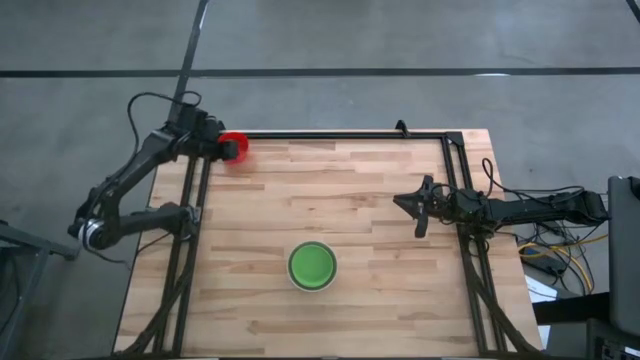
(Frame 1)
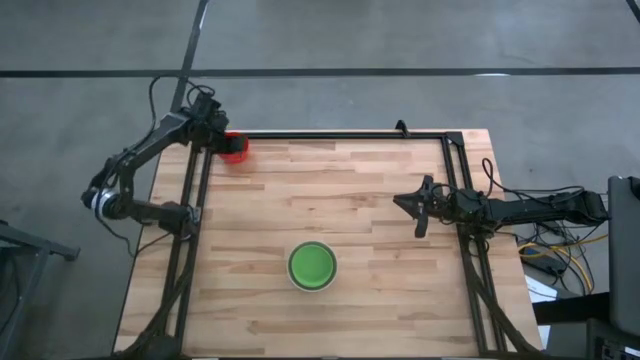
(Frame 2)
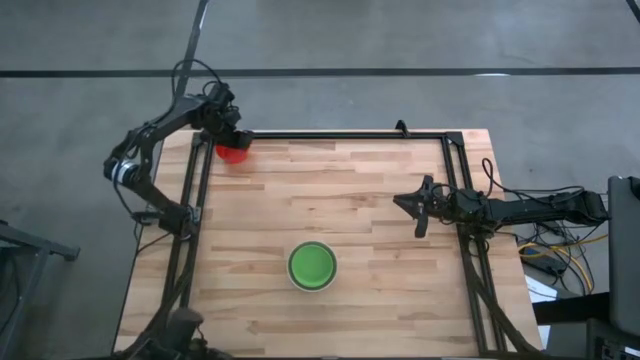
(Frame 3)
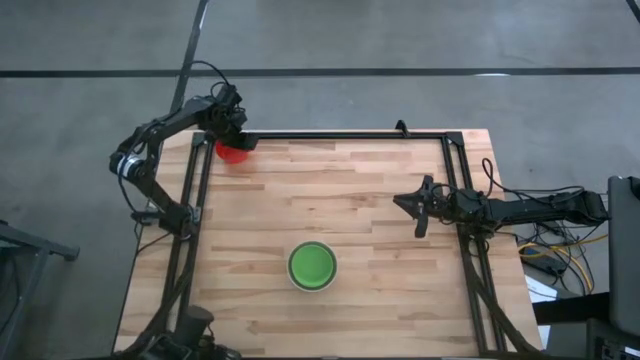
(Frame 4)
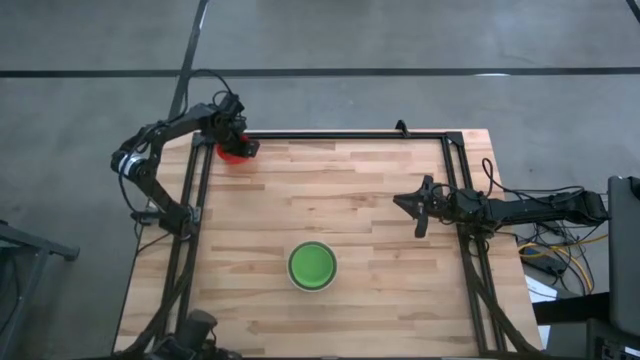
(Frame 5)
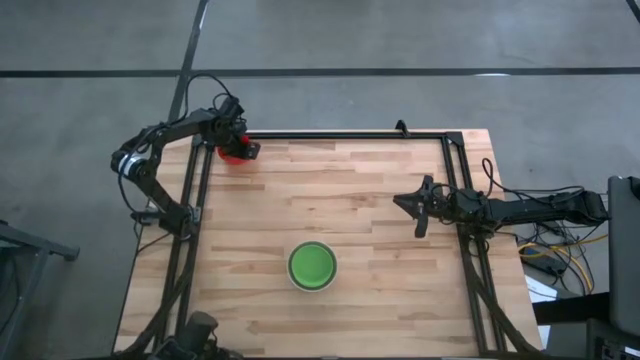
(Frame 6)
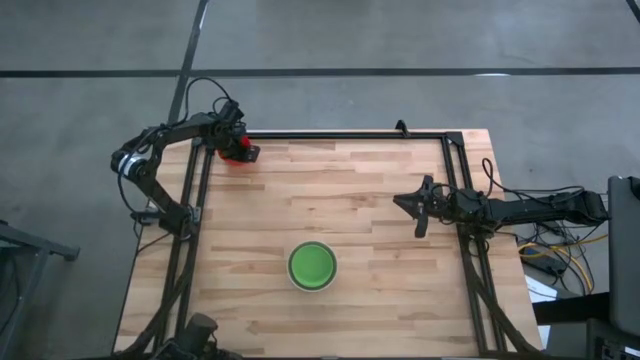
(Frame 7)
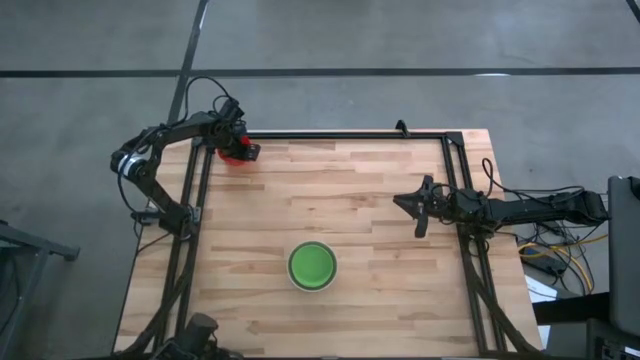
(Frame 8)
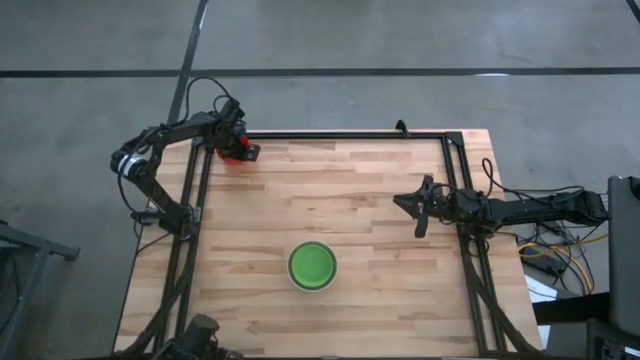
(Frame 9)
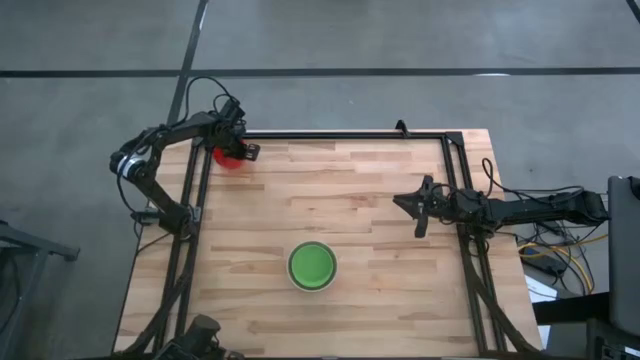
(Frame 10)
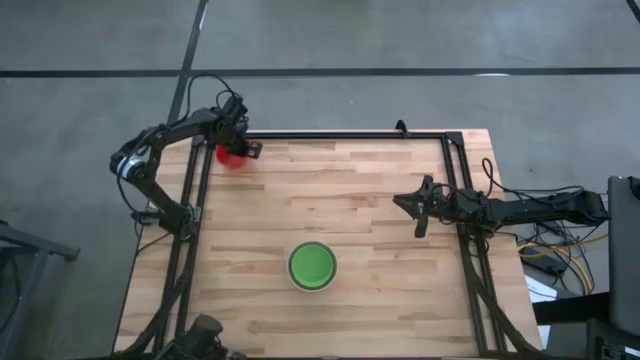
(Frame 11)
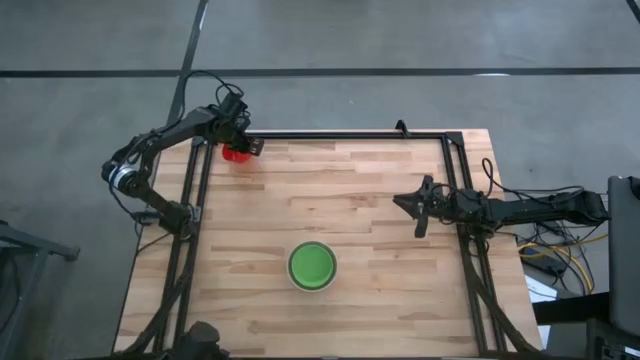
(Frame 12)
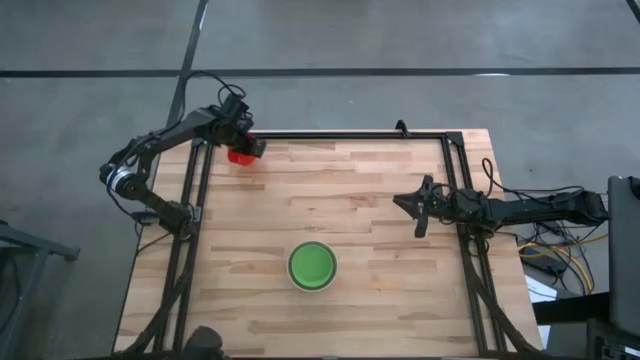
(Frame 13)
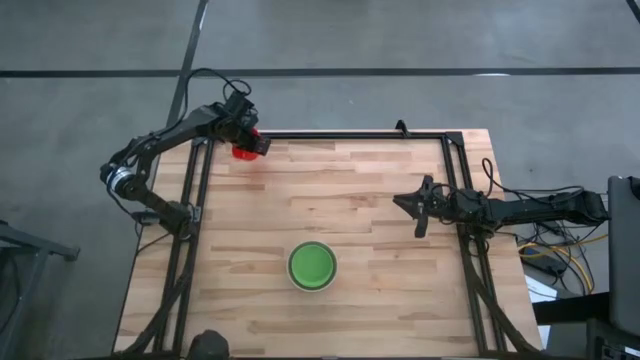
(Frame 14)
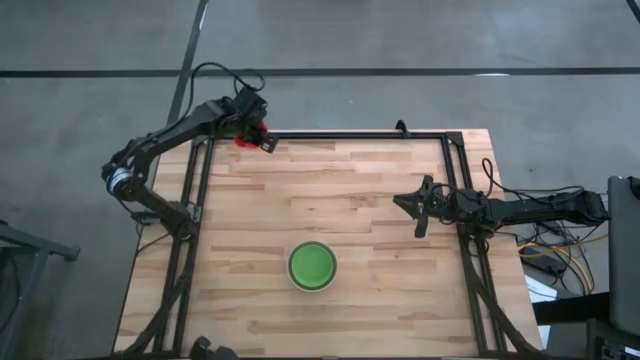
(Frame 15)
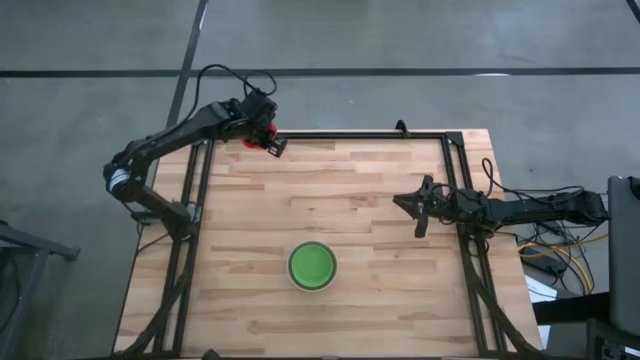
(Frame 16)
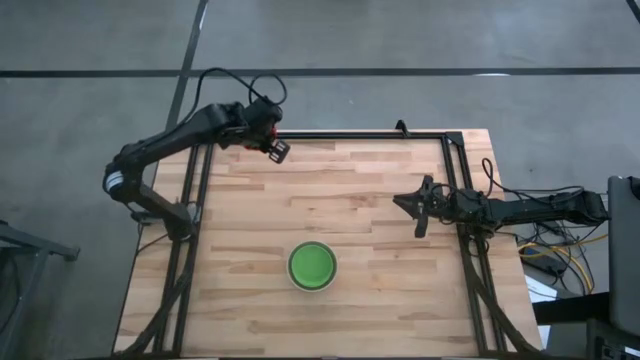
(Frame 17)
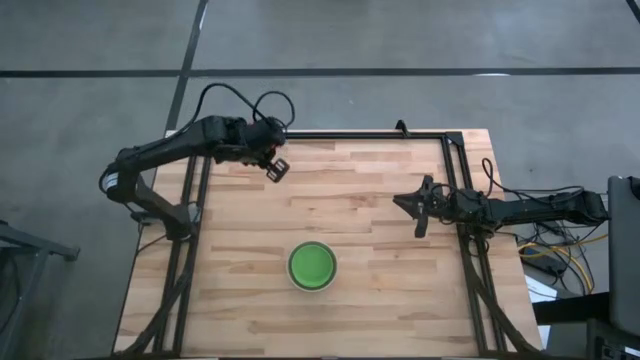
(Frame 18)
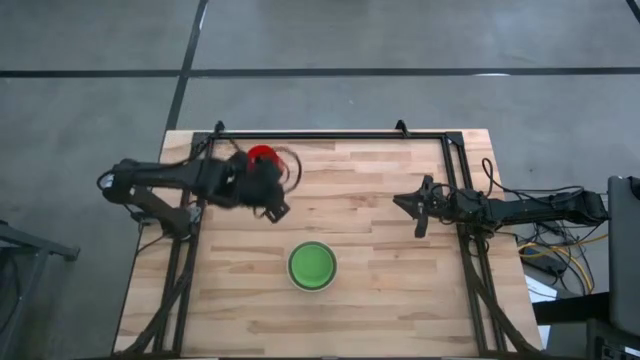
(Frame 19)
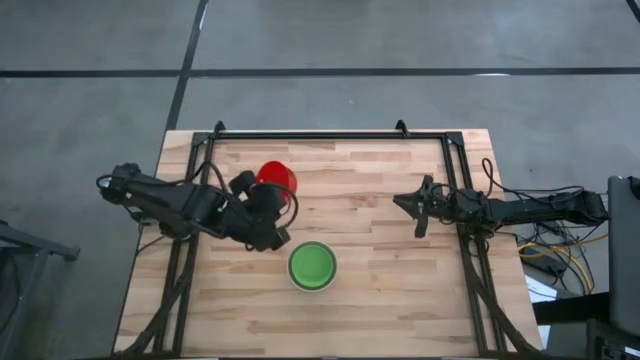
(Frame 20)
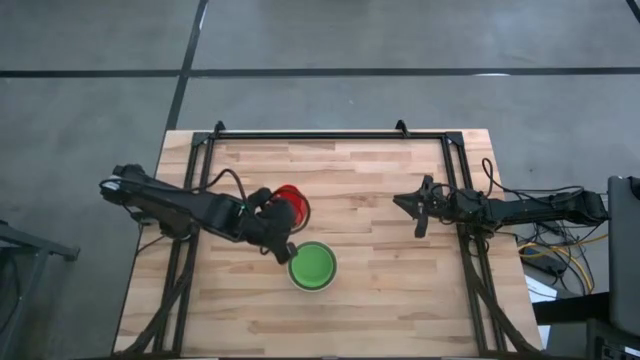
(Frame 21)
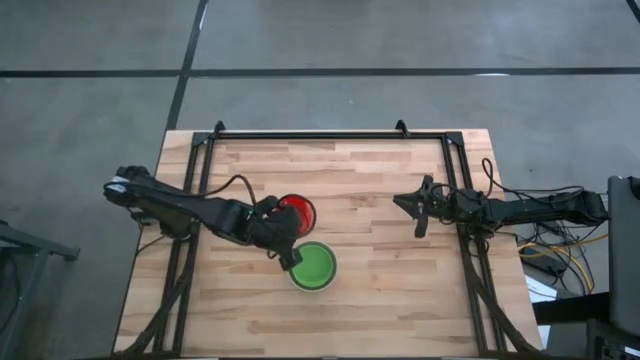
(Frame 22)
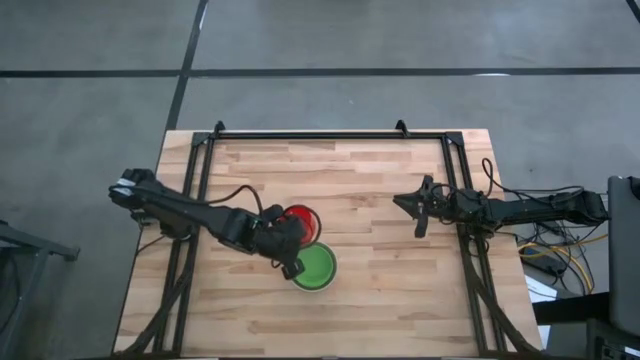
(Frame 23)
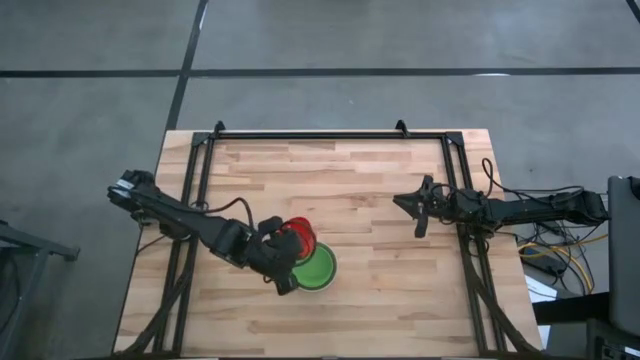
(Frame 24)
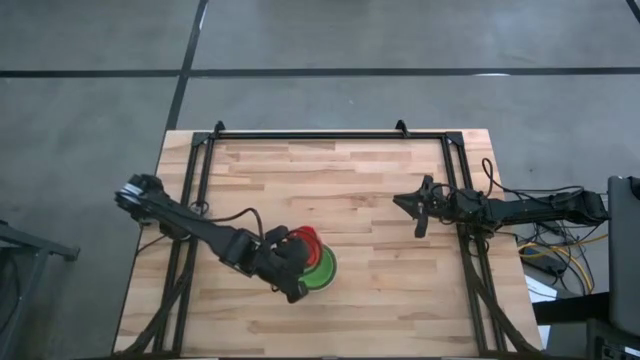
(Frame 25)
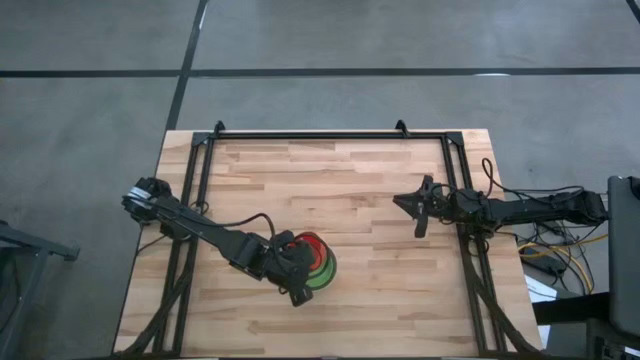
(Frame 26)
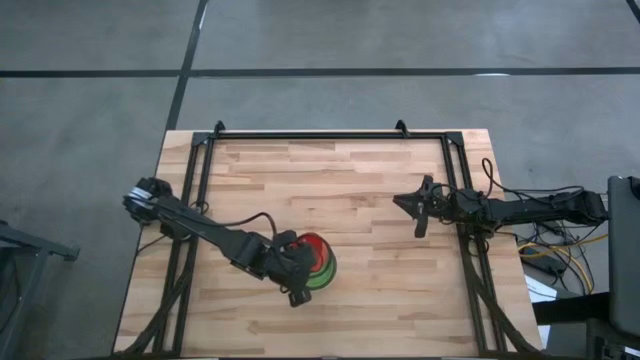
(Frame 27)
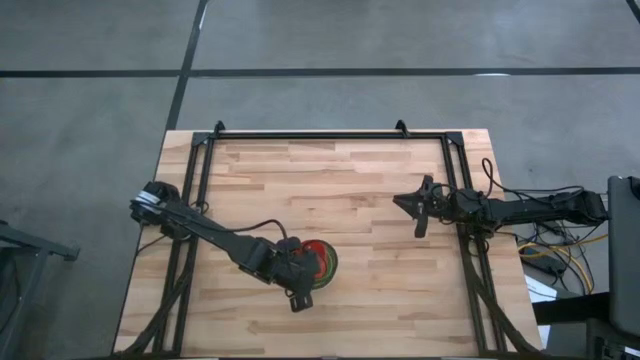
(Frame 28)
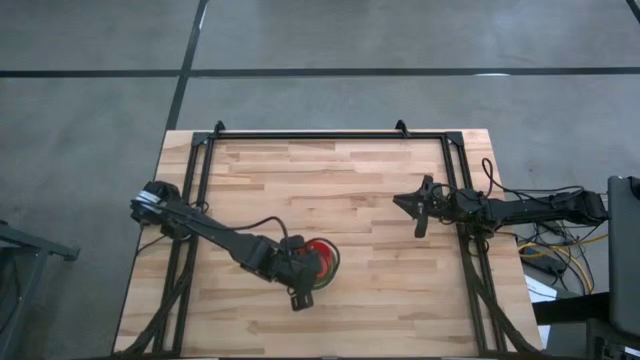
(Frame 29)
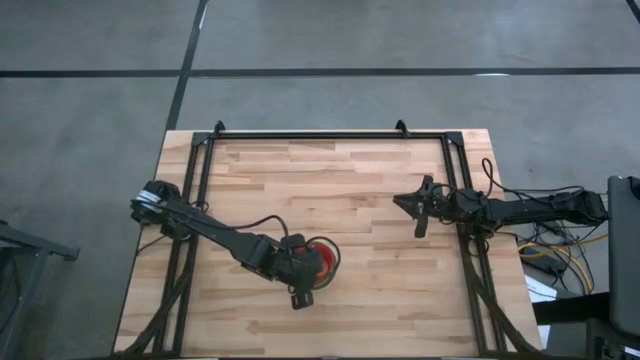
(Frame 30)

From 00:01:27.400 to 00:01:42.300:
Stack the red bowl on the green bowl
